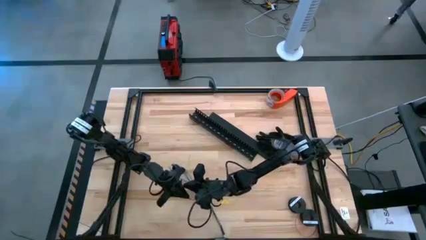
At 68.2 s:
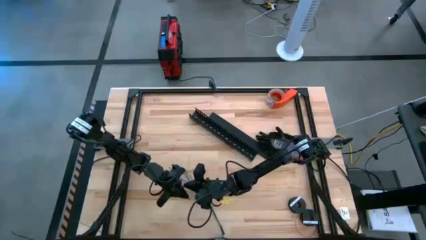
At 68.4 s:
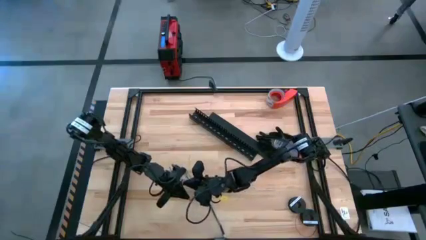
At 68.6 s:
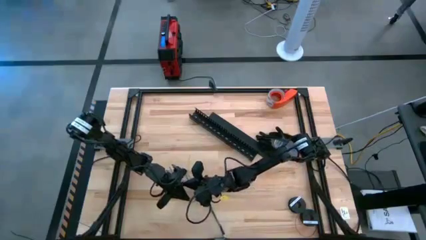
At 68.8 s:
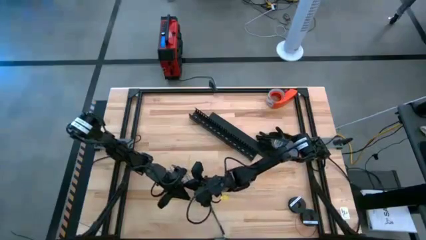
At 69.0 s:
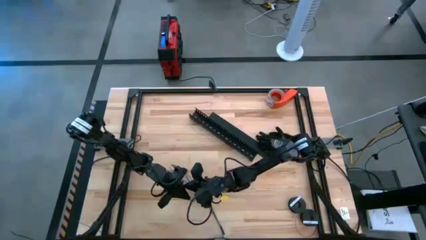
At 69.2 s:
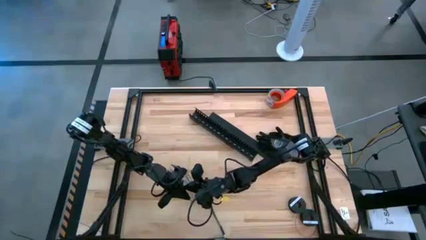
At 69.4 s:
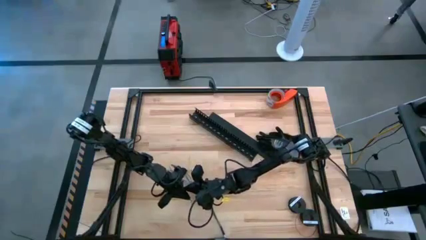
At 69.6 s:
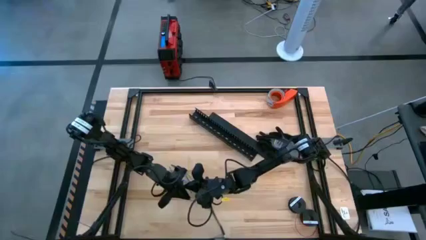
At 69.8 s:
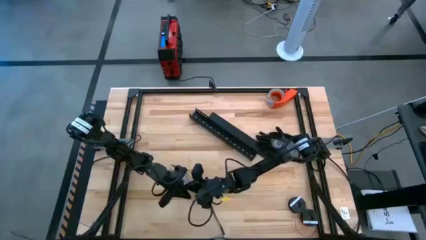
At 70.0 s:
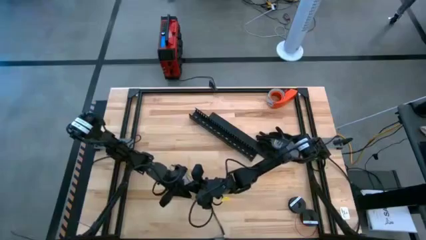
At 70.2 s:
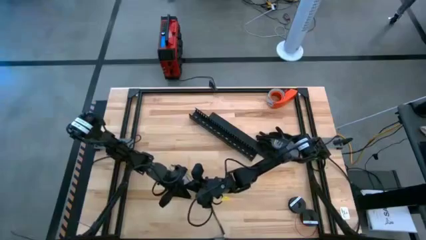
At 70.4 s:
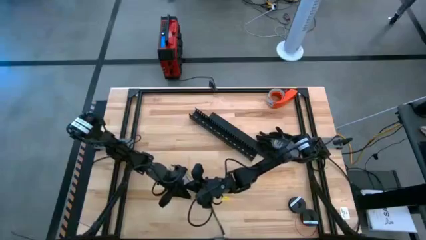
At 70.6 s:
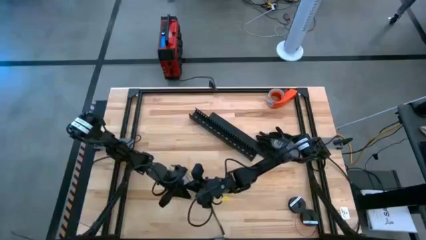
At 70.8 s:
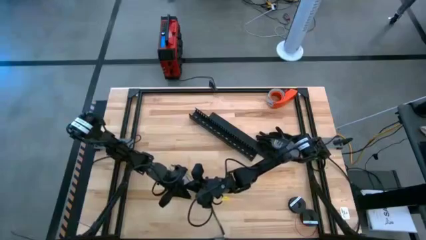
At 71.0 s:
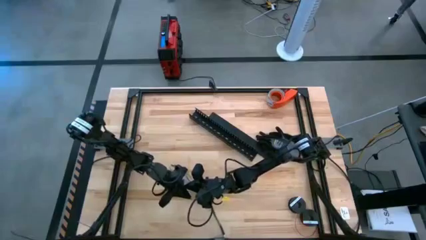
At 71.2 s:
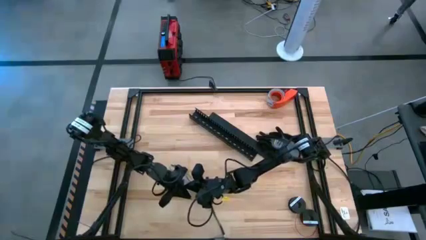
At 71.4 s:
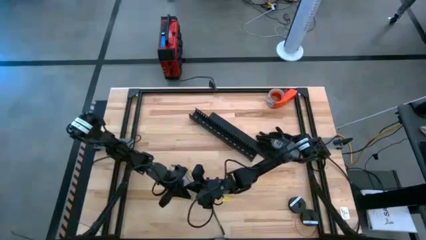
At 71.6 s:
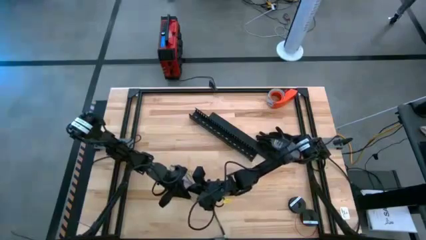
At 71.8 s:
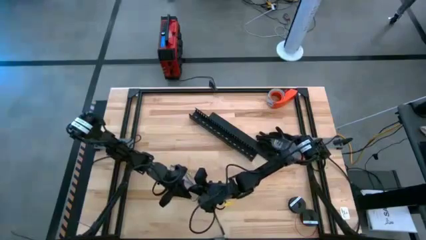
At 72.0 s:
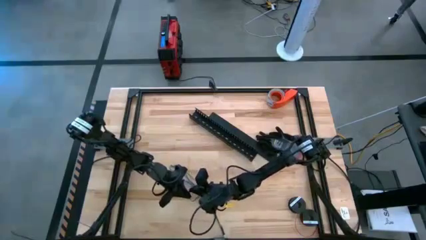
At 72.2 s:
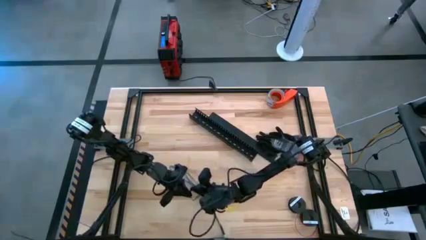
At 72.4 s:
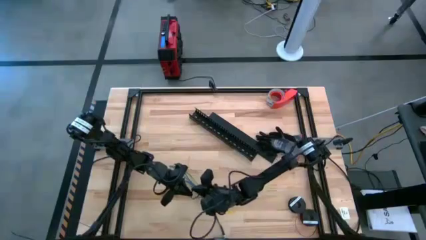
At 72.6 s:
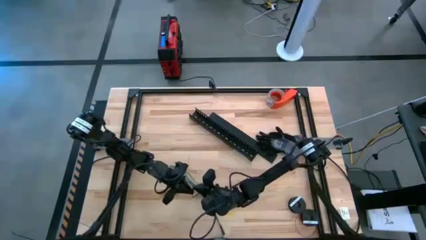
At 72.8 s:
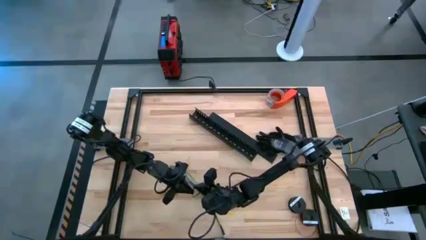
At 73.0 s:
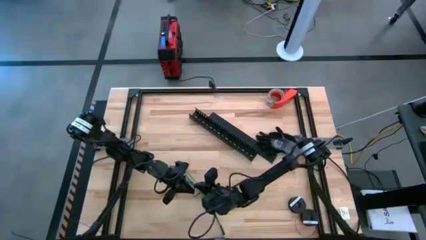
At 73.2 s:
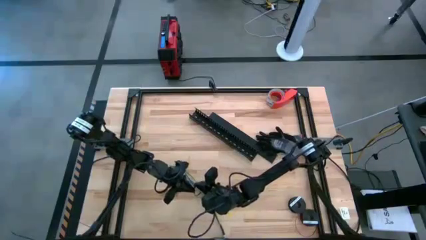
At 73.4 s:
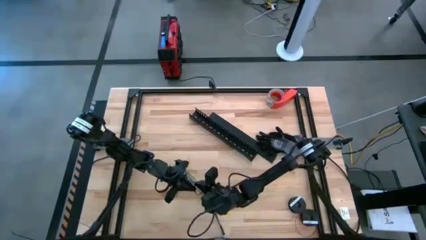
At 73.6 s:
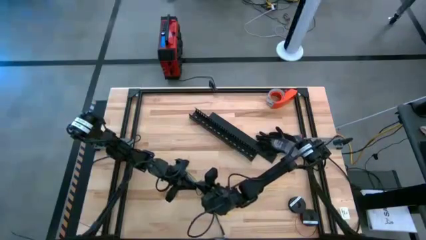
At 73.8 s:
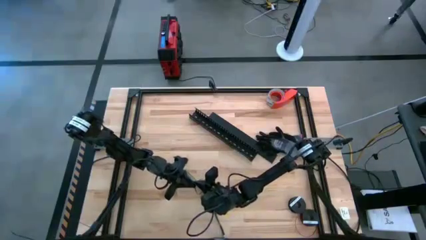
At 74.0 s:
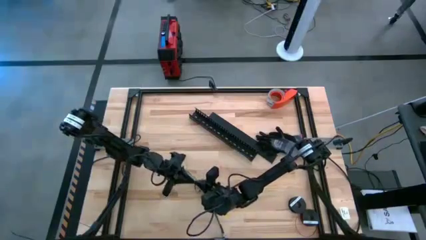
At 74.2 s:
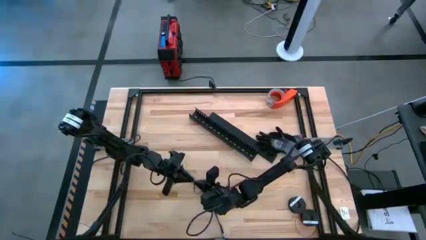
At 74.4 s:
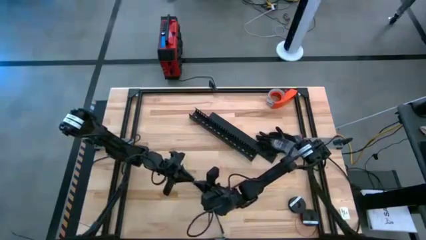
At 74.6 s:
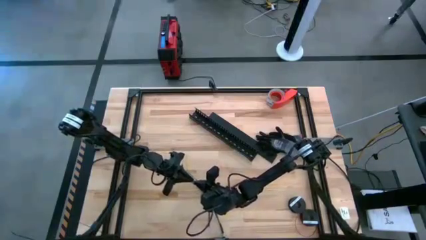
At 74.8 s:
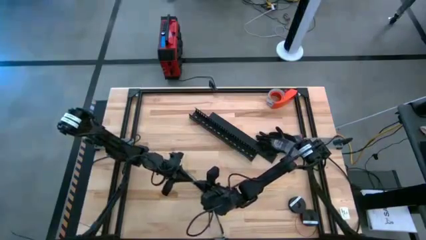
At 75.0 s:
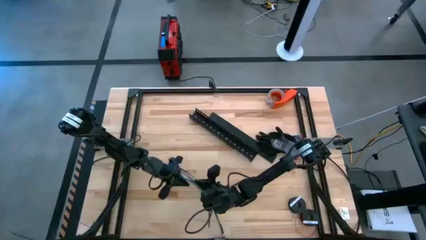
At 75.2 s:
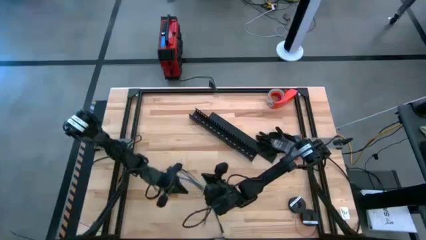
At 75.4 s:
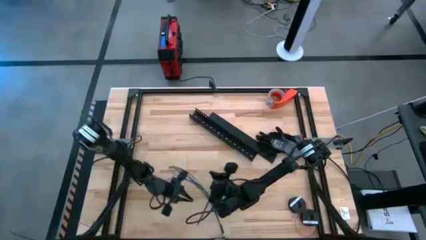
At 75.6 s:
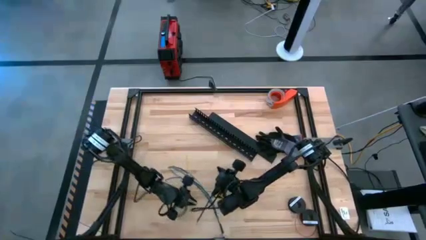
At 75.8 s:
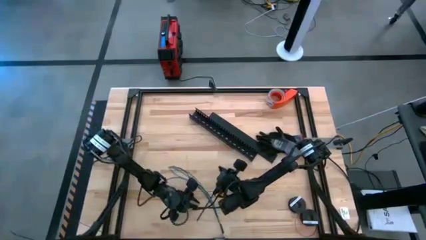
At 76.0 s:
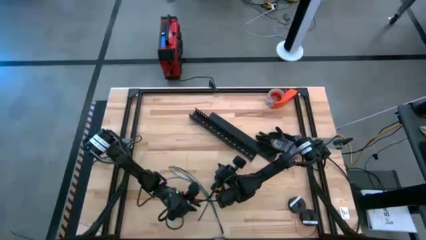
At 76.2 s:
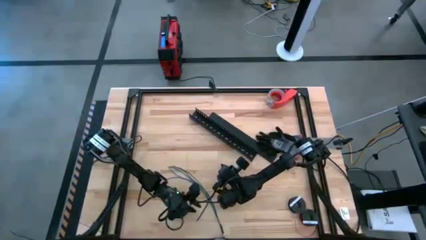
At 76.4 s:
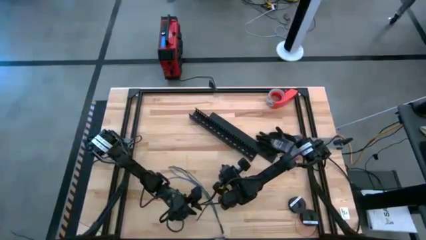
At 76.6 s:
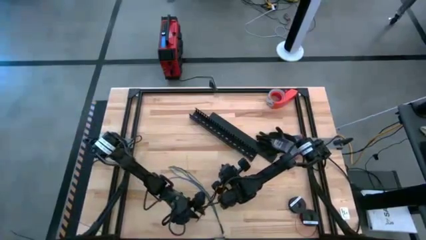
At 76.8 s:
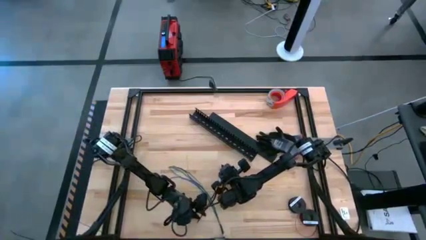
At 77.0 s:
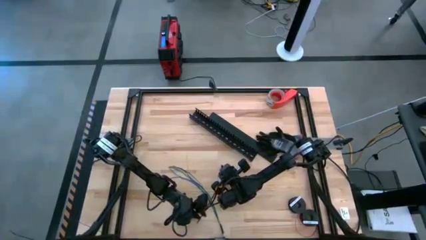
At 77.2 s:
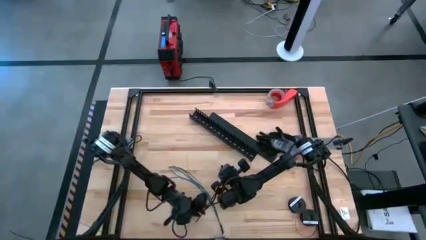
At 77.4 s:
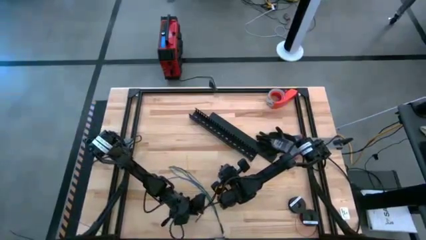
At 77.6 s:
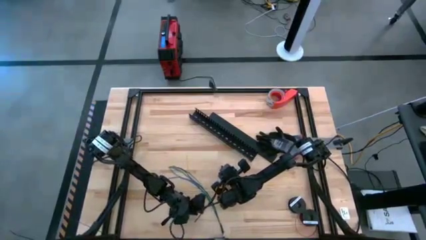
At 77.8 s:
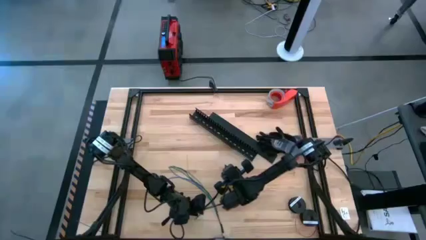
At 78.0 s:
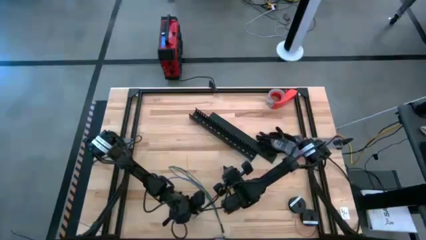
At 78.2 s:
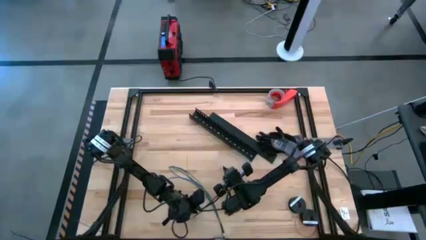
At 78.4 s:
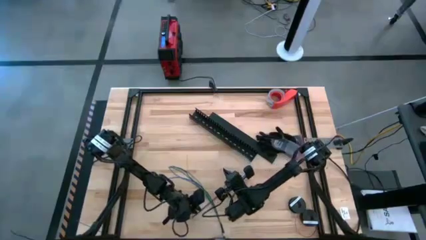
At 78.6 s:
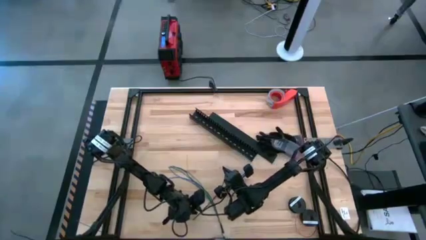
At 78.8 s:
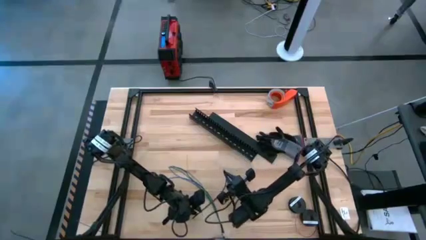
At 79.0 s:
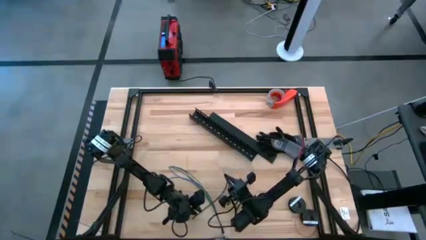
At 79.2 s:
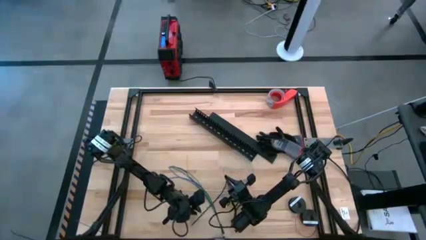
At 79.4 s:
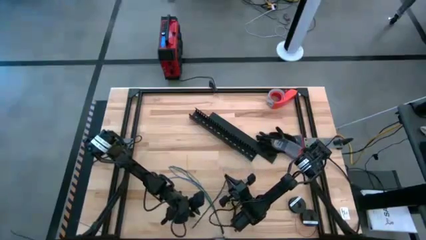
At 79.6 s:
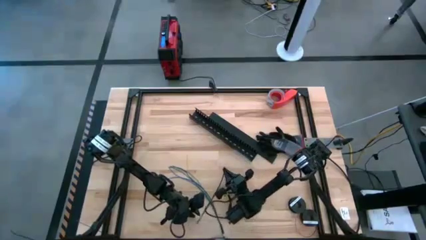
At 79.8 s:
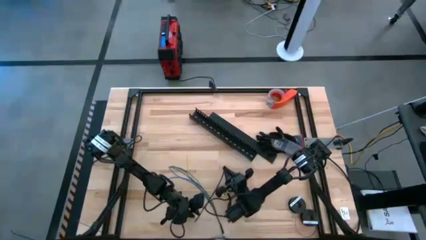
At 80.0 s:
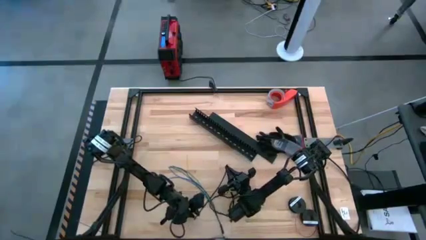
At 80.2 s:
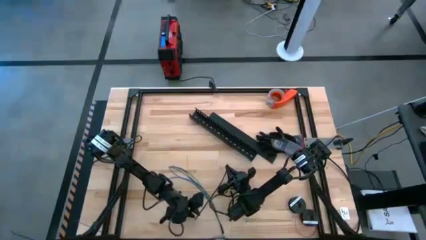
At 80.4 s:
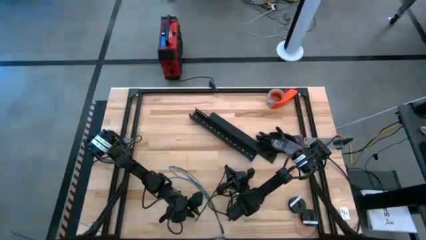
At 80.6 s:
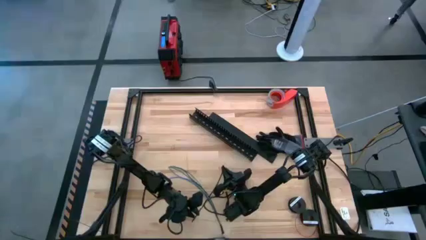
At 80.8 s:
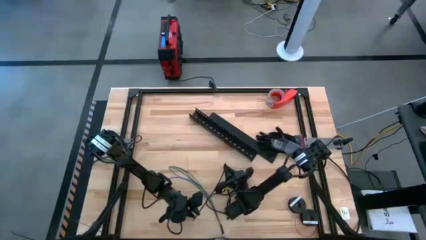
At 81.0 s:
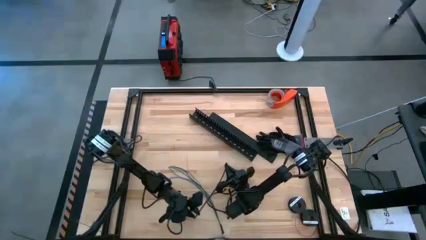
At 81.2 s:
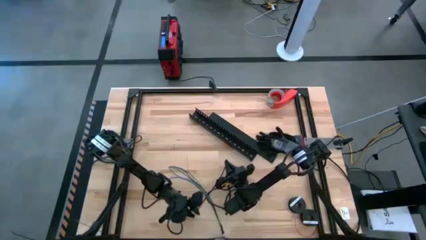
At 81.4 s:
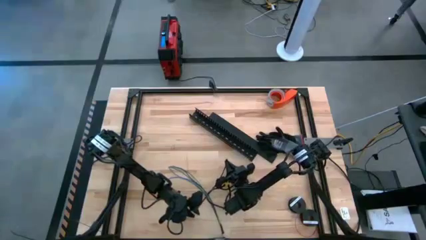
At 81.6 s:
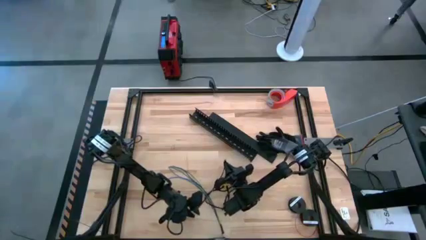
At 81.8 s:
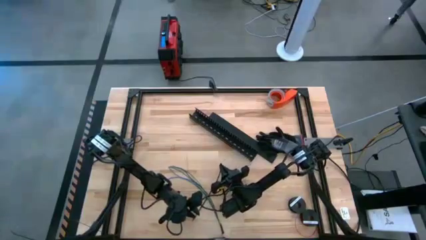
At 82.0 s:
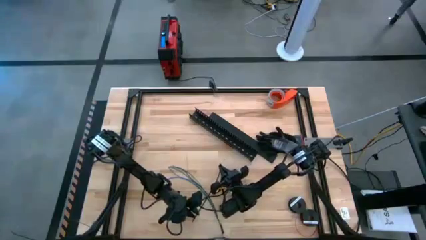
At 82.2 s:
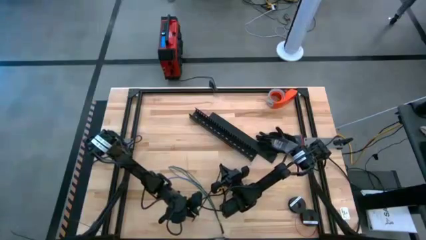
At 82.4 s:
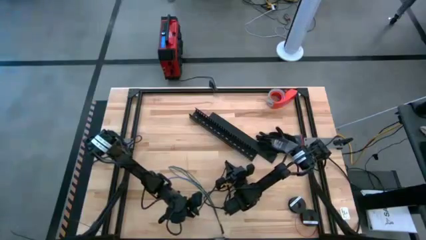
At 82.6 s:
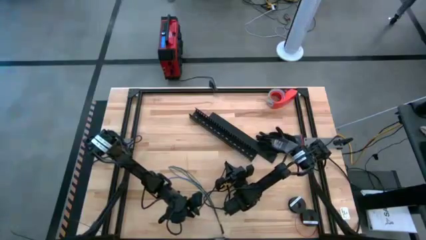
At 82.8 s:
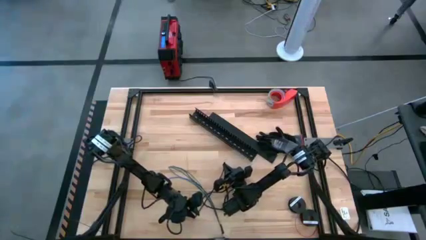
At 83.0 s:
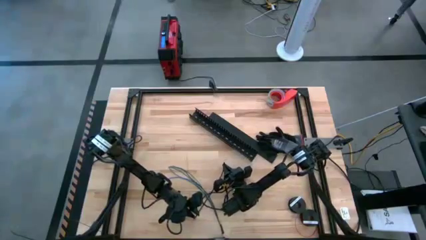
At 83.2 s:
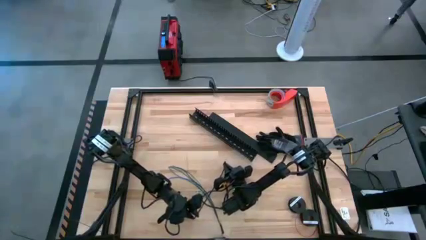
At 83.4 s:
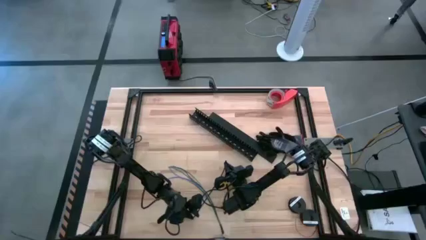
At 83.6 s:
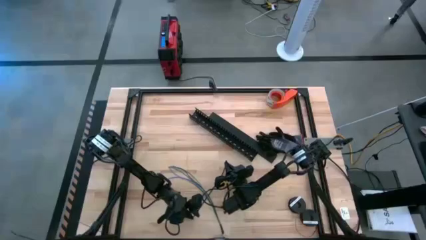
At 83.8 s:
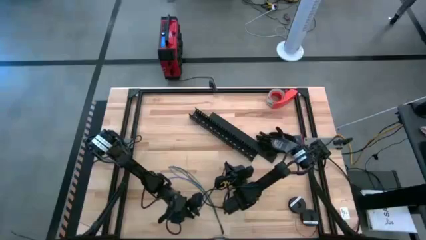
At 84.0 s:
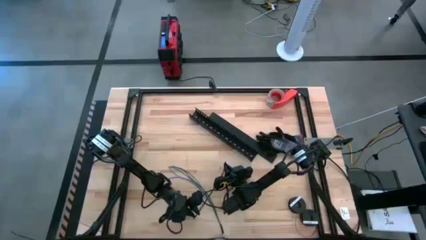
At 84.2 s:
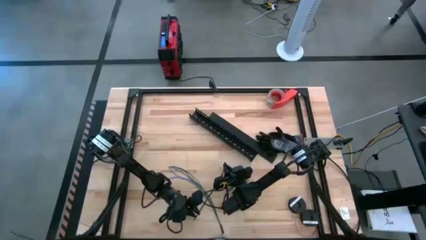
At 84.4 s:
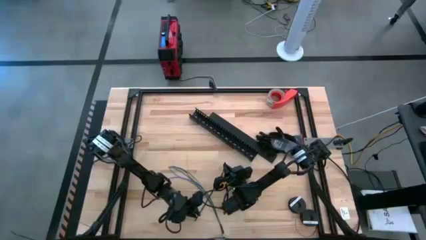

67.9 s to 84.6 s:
Task: Ziptie cables
Wrap the zip tie around the cable bundle
